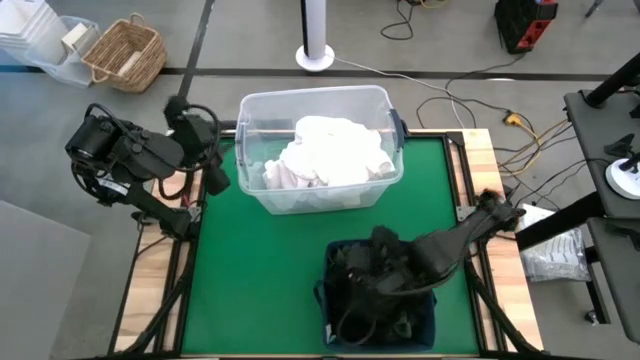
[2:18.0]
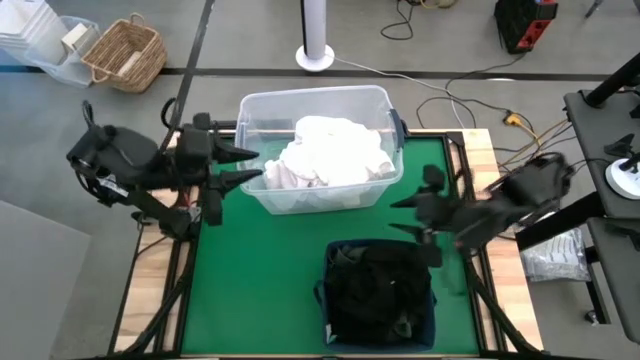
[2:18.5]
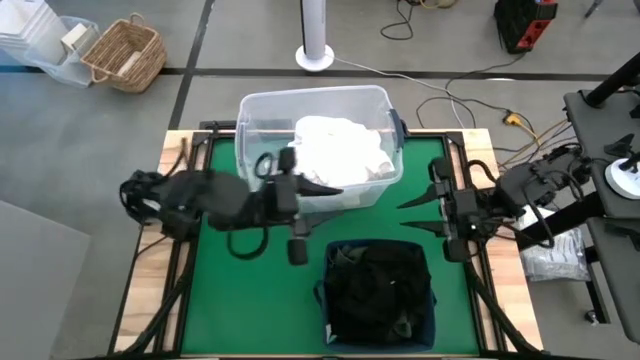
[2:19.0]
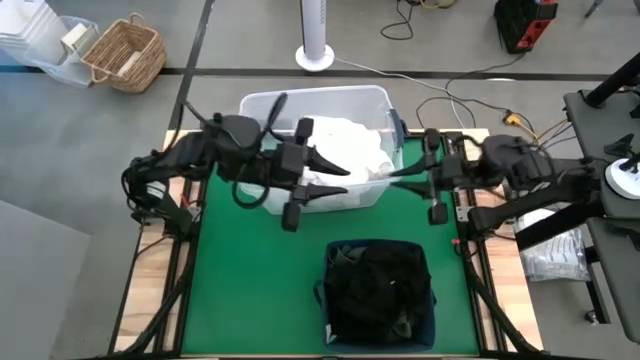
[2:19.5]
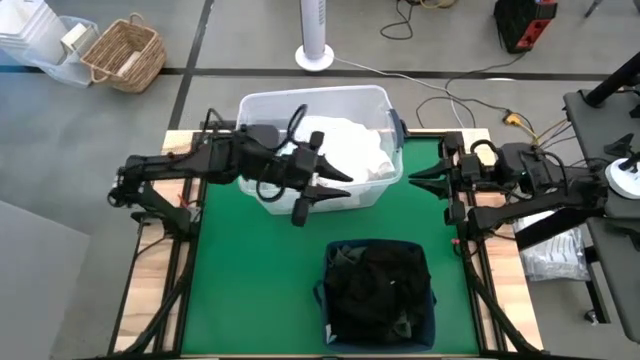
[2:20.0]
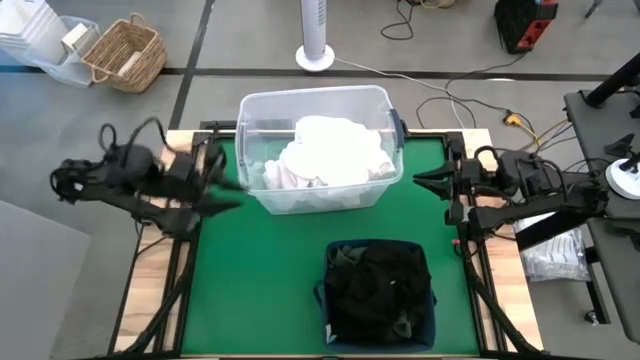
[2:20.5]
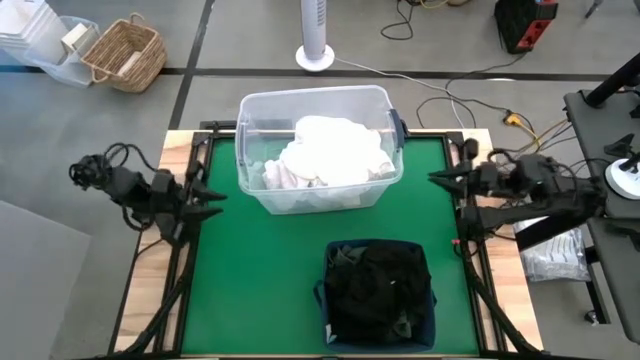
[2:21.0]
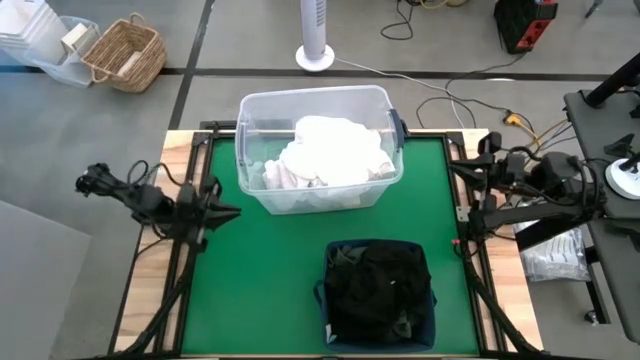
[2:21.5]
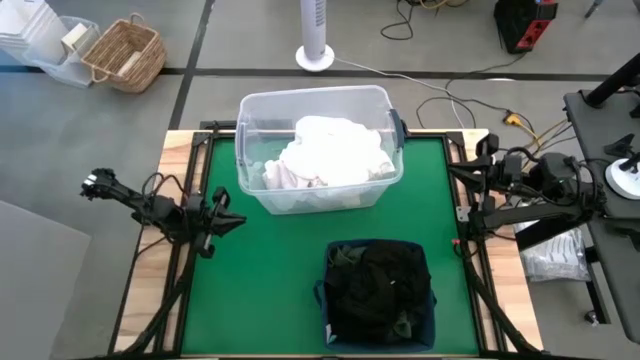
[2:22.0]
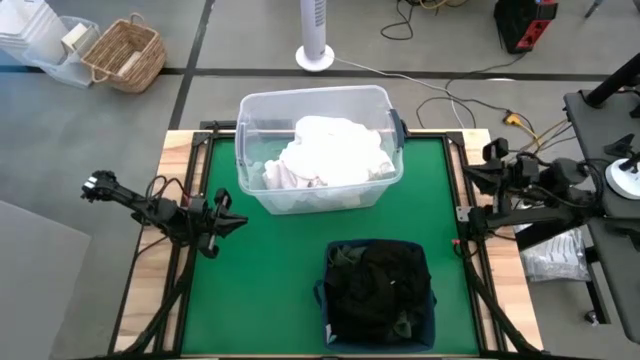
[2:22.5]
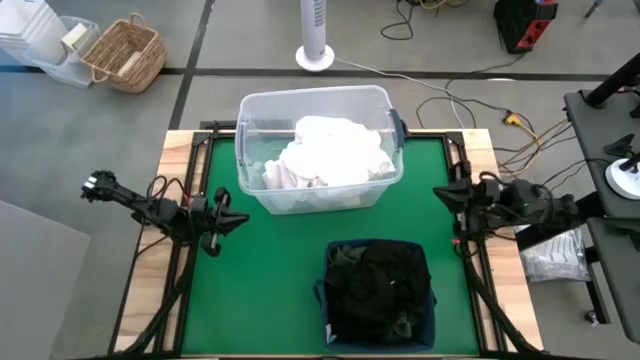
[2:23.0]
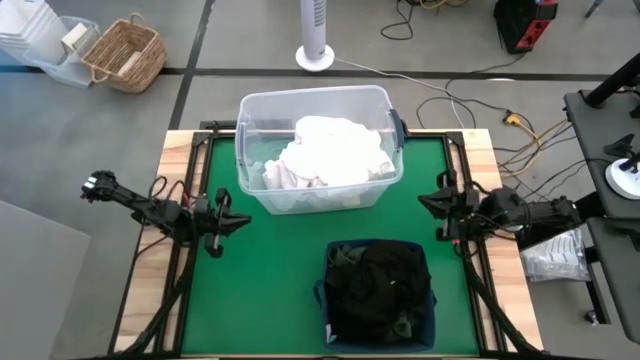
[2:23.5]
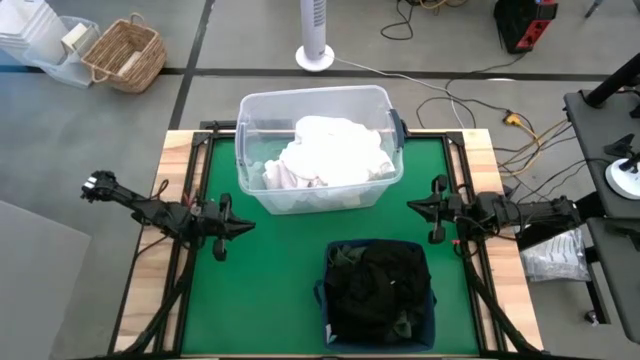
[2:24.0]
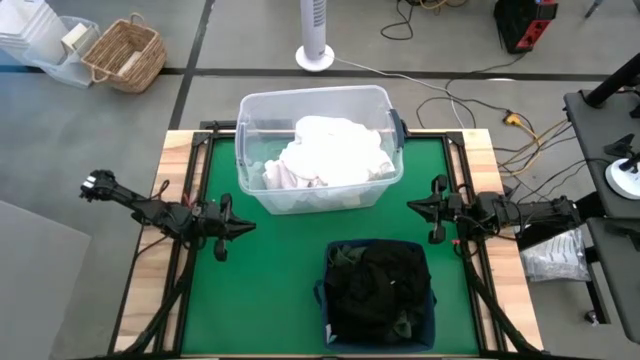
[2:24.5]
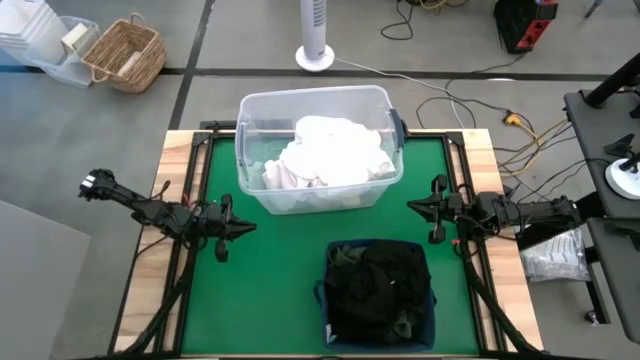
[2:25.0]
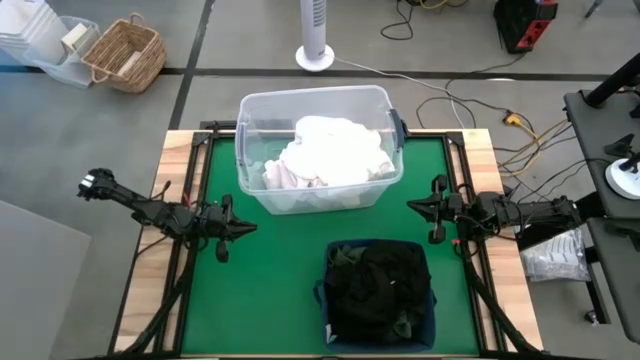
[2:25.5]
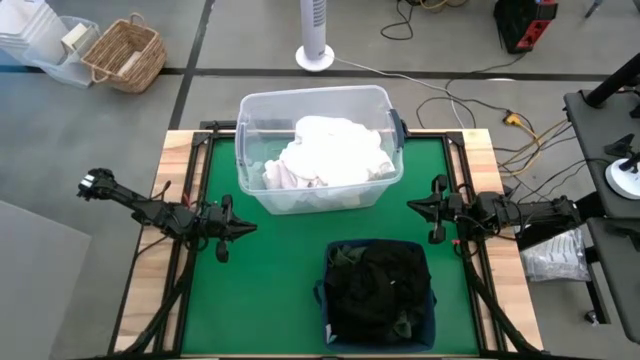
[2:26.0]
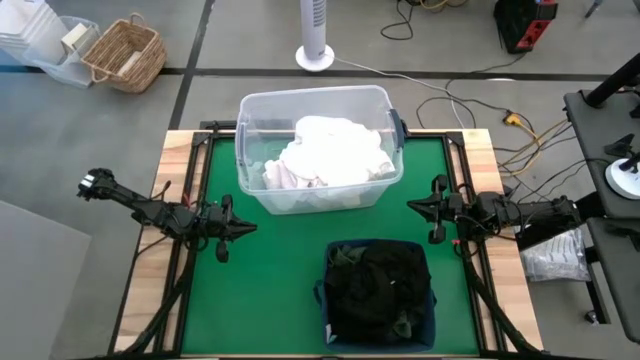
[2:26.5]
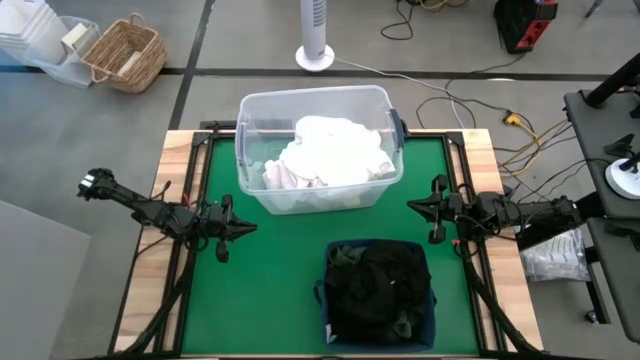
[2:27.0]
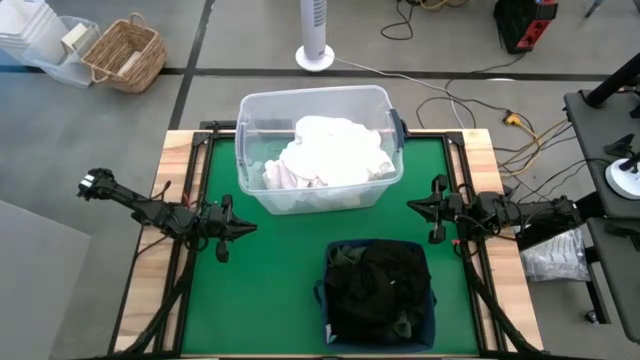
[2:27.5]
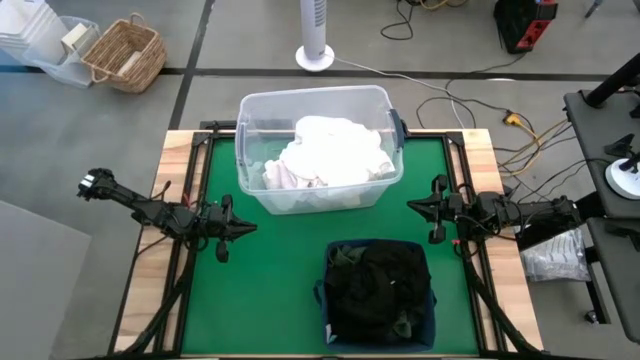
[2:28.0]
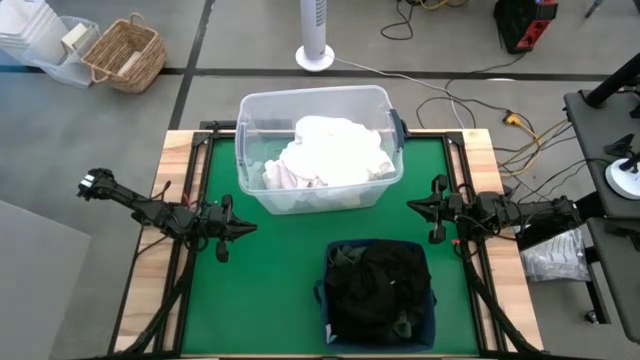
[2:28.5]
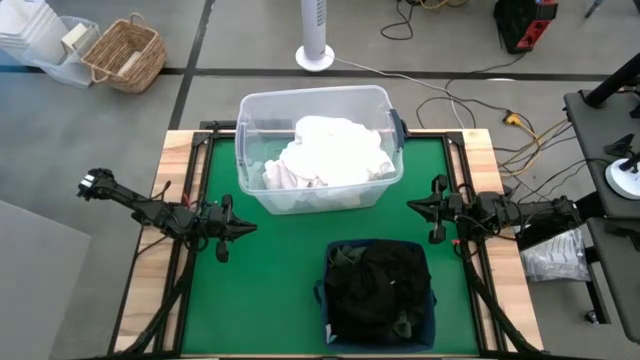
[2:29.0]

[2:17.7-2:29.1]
Return to Home Position

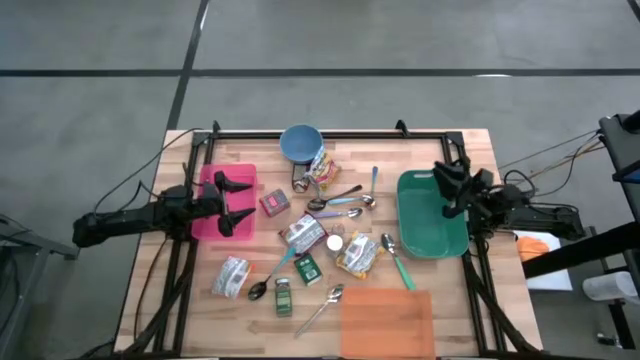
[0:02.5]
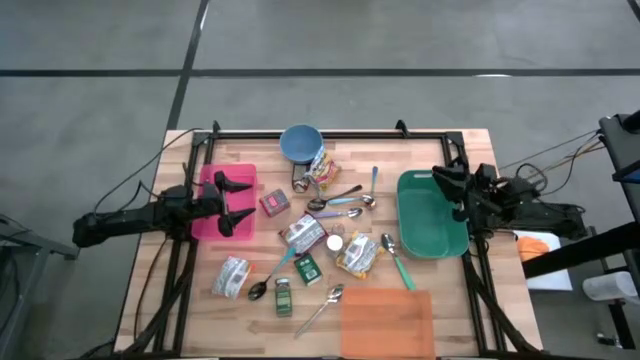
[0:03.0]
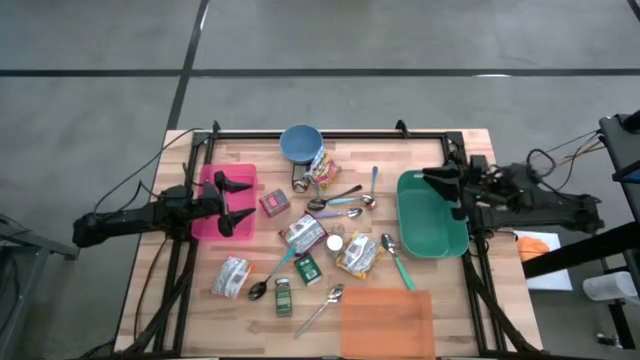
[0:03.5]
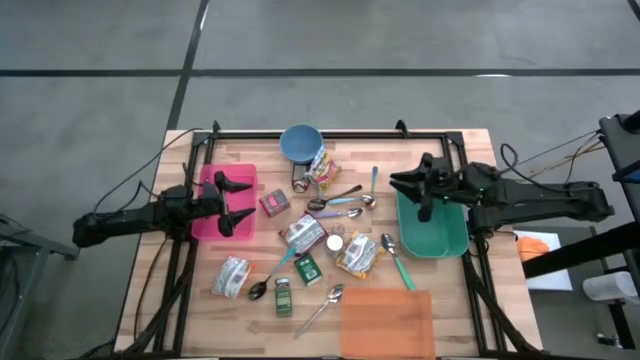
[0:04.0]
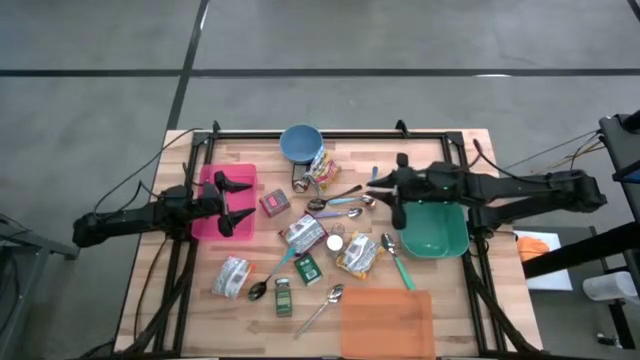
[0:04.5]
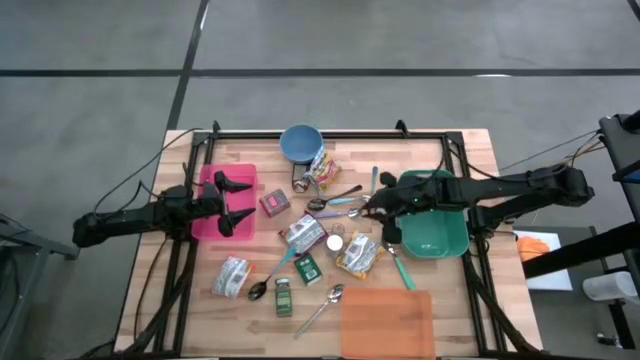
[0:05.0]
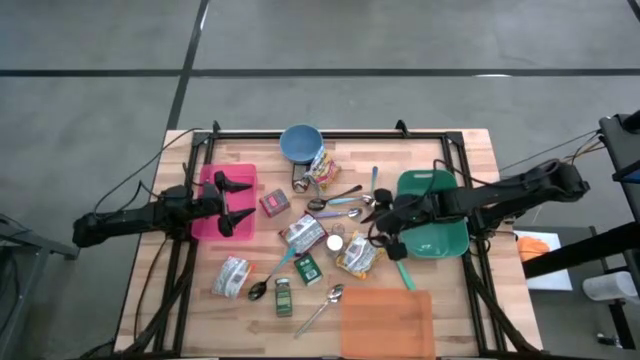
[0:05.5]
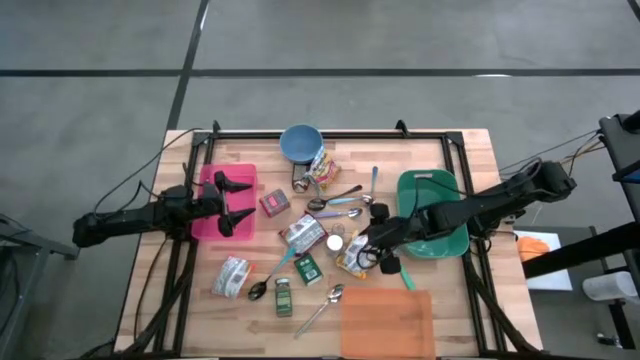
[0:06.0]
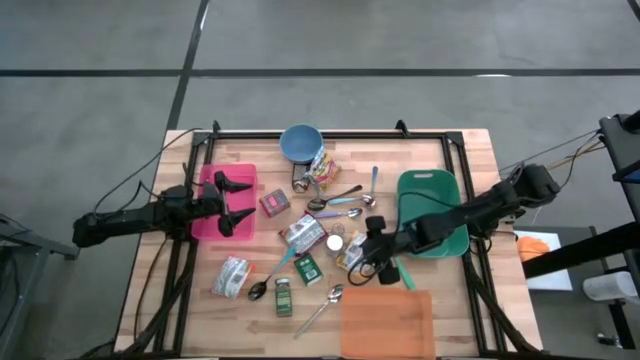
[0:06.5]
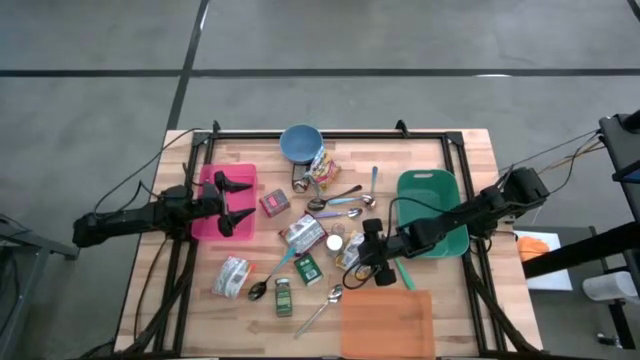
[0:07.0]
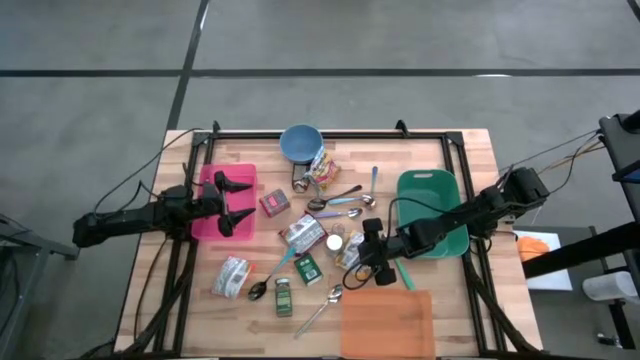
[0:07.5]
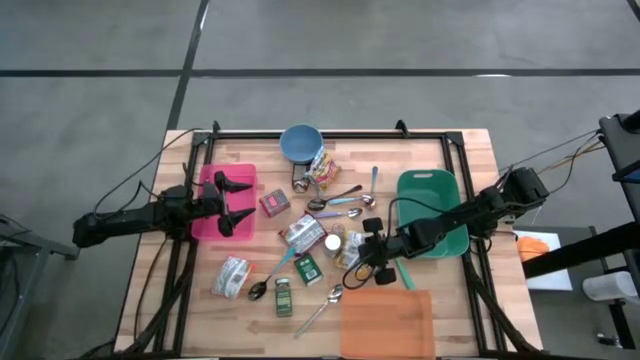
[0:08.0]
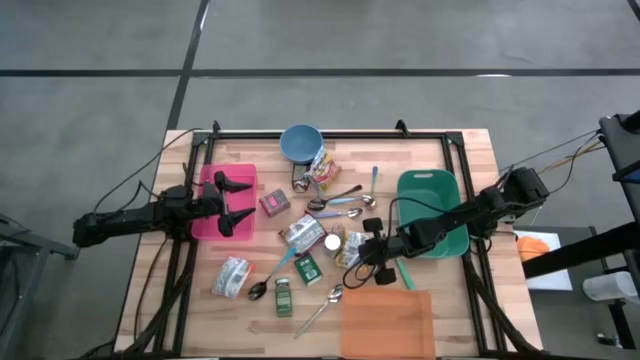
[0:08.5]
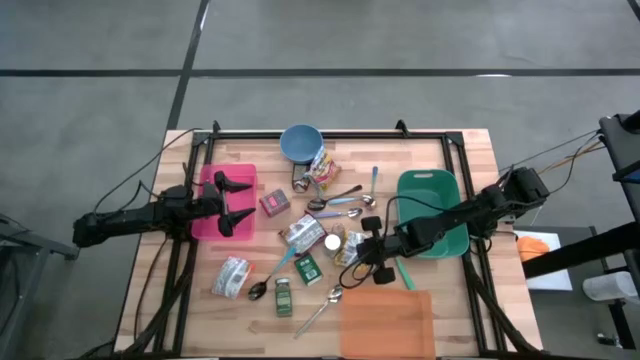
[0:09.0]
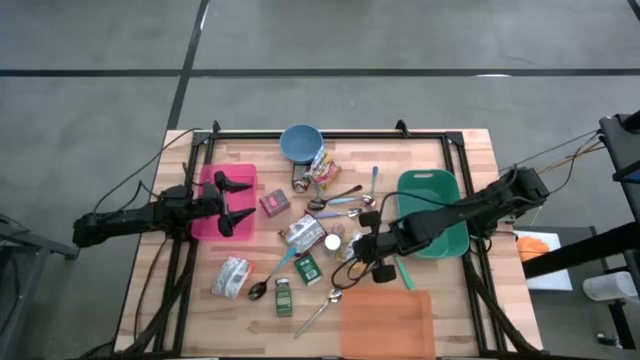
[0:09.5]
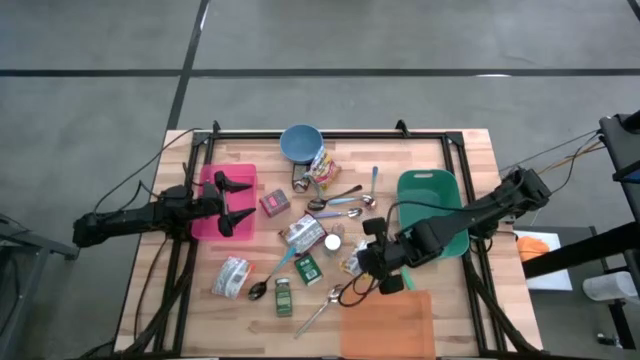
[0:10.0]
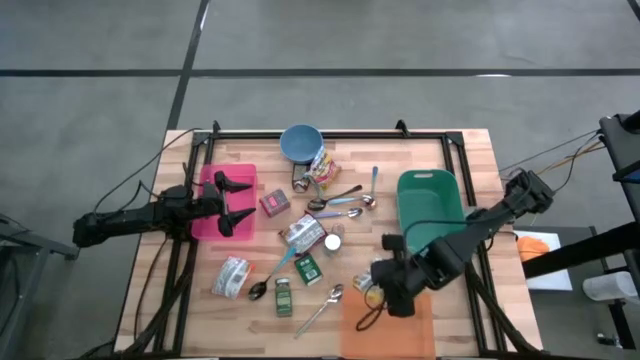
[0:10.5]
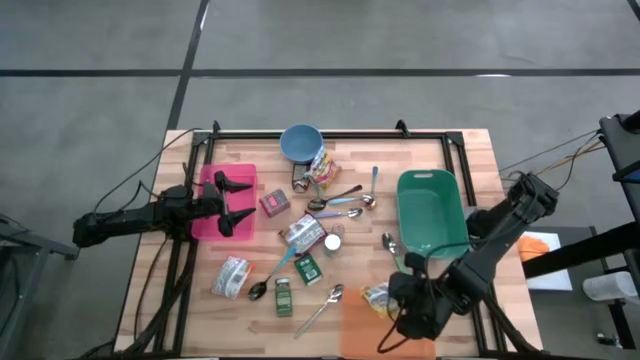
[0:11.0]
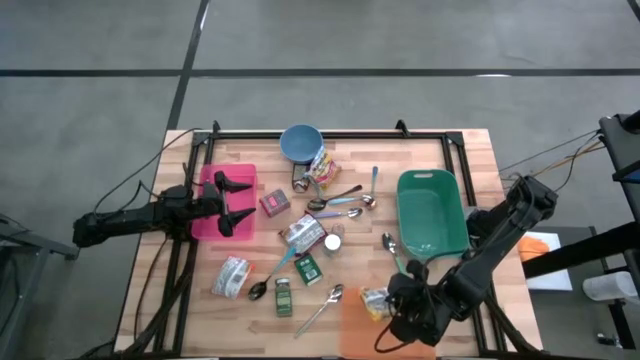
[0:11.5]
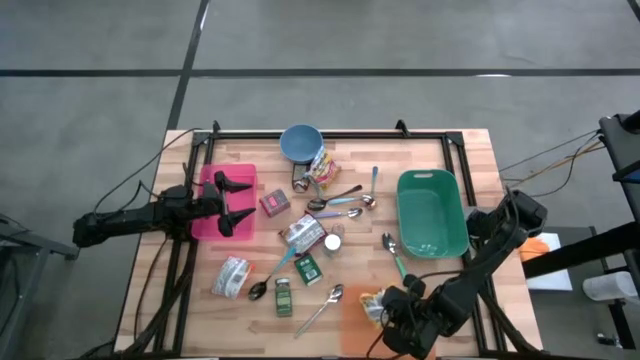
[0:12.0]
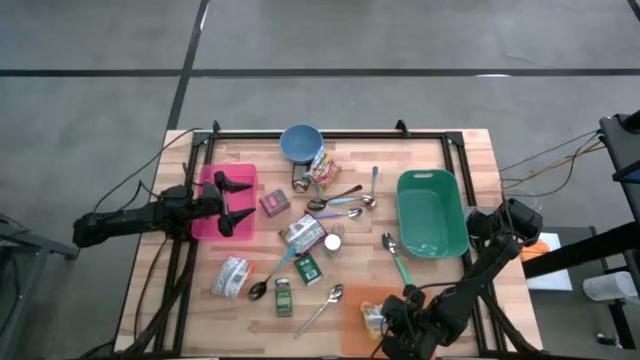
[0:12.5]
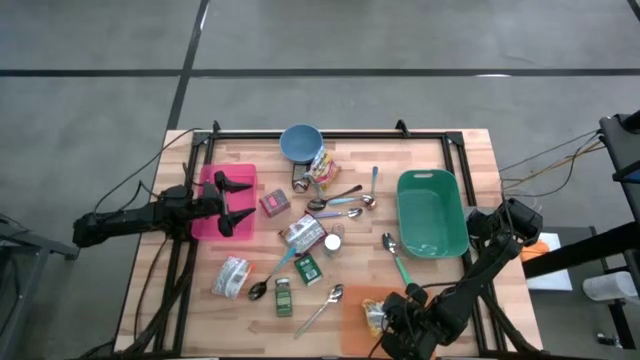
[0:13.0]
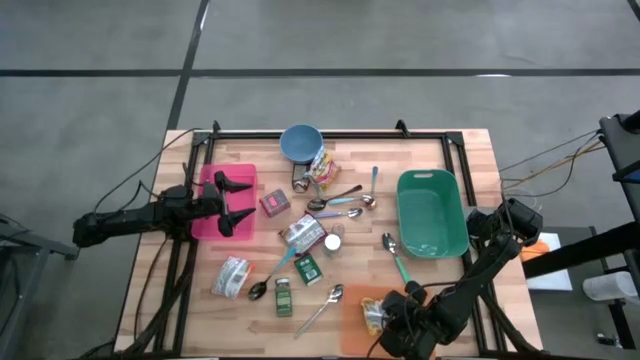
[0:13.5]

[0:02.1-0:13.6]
Put the yellow noodle pack into the orange bin
